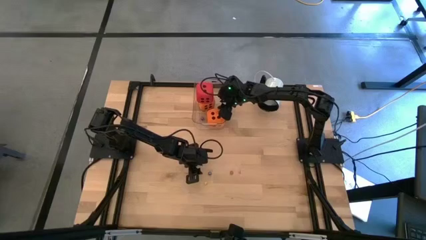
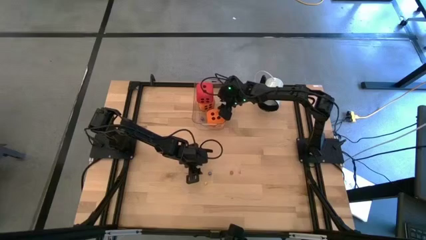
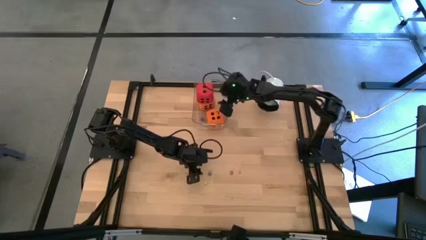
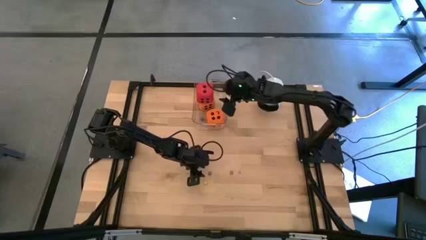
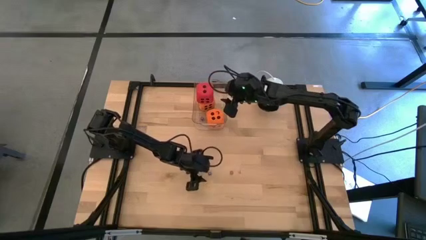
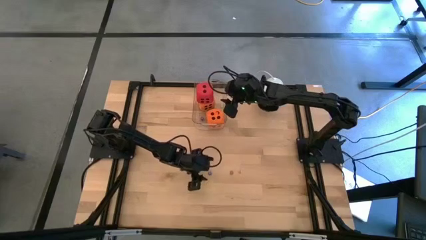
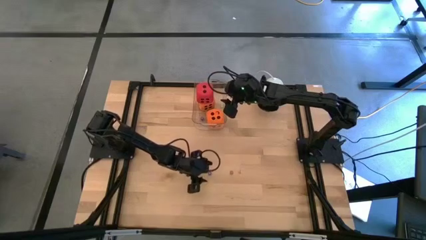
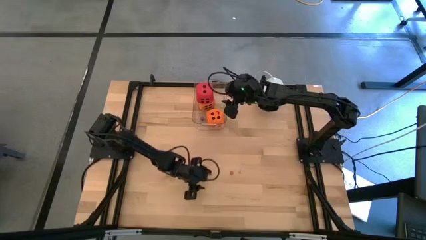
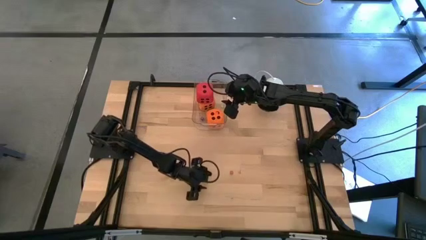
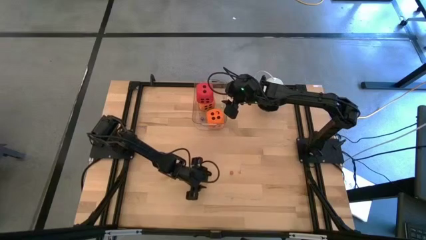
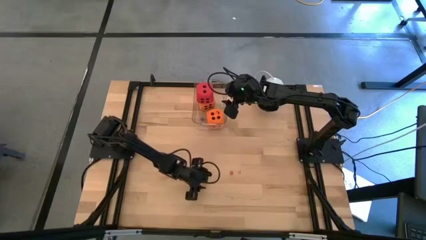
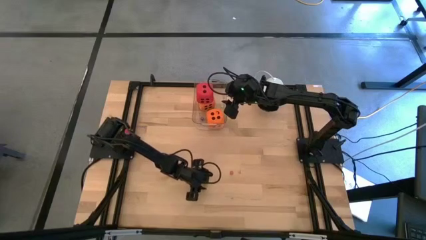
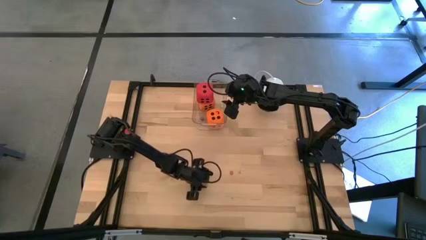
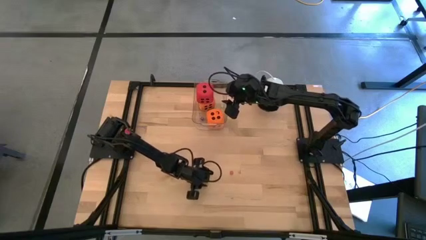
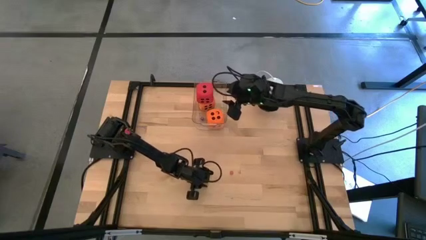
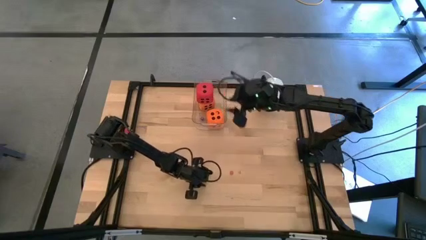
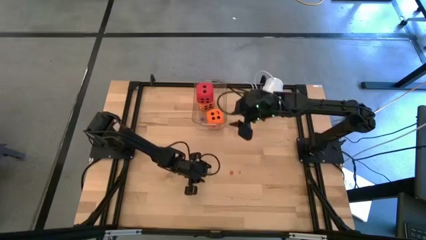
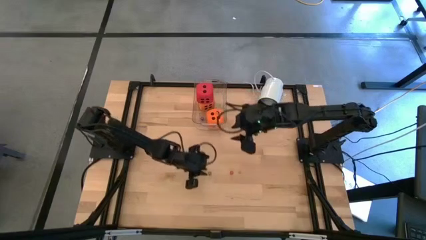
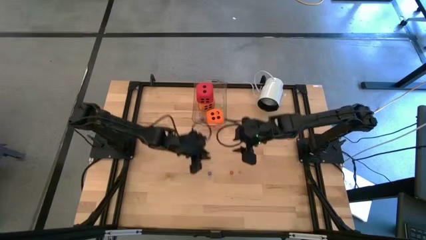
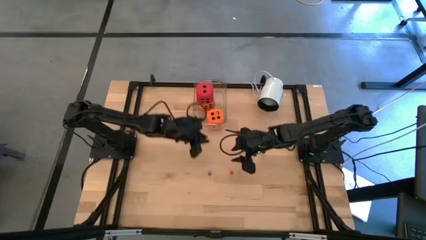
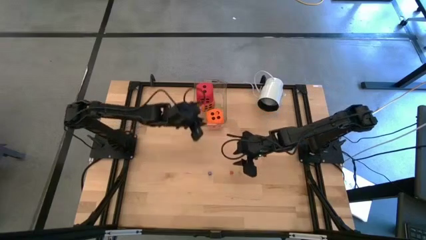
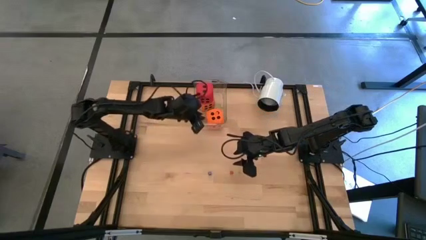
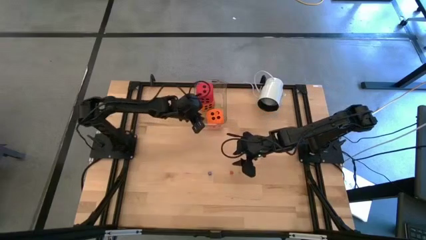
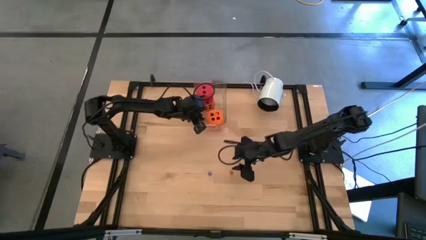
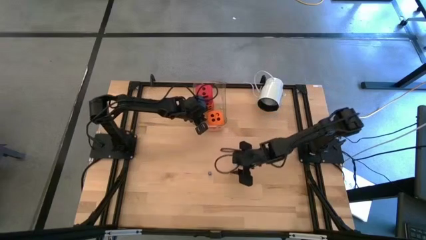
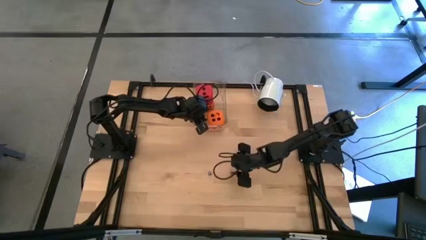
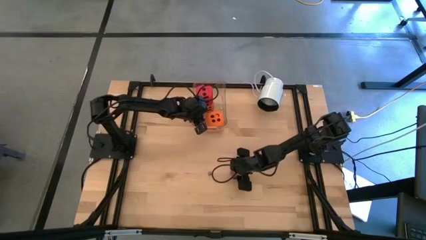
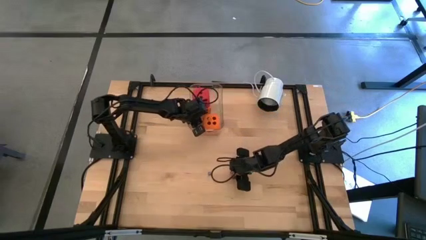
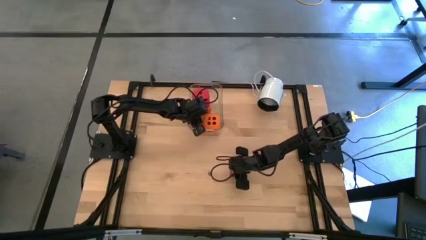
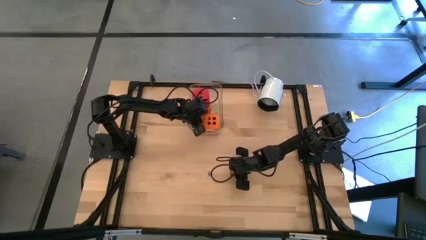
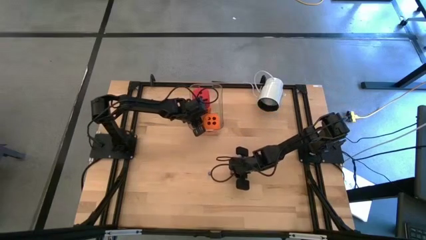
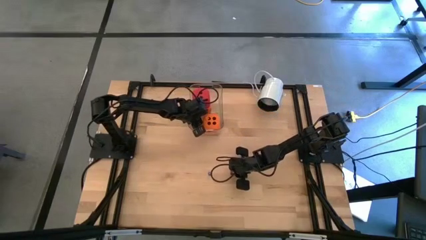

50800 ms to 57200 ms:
Task: Pick & Place Dice
Put the small yellow die into the bin

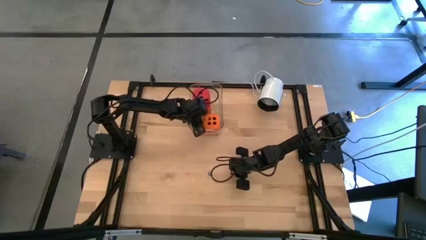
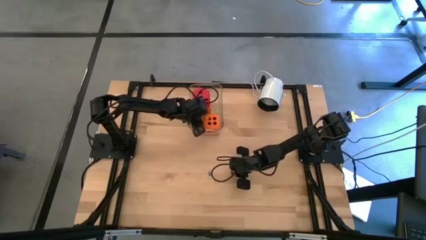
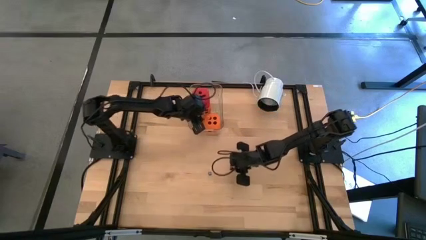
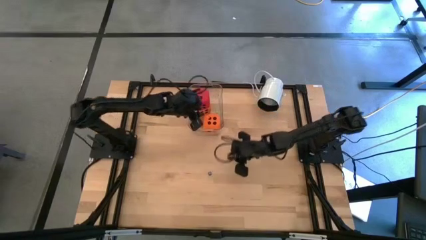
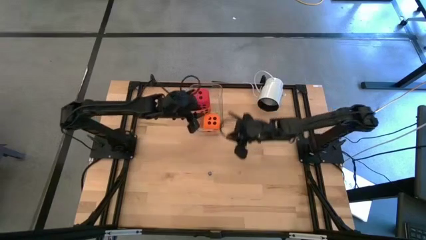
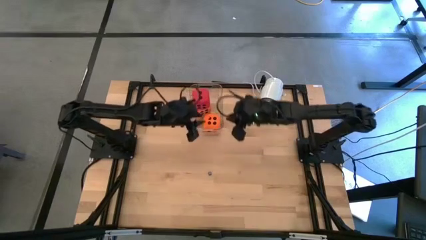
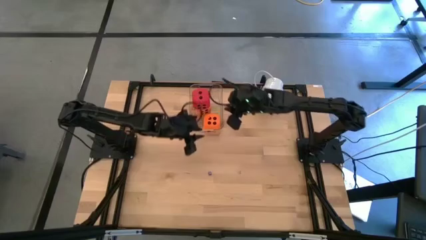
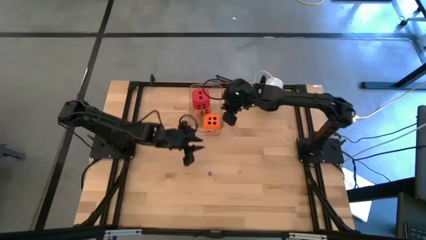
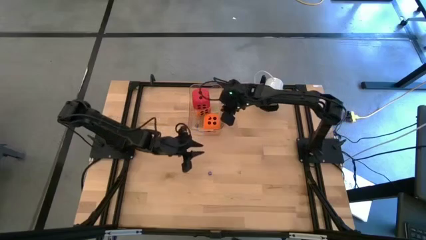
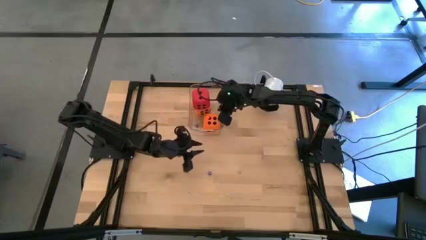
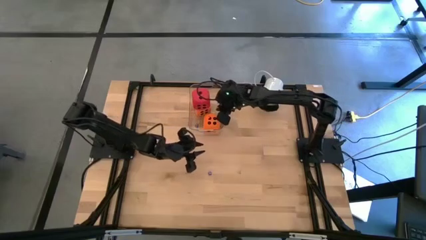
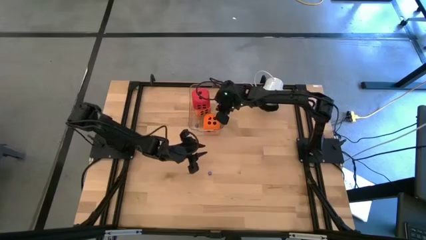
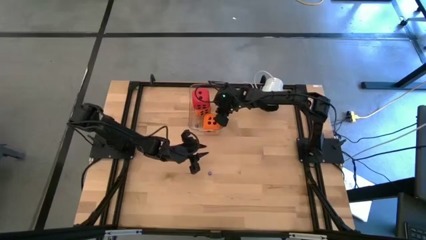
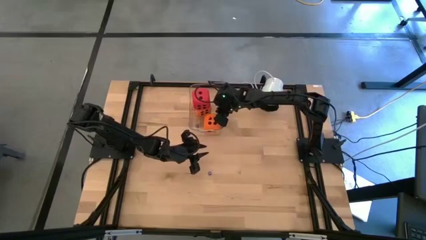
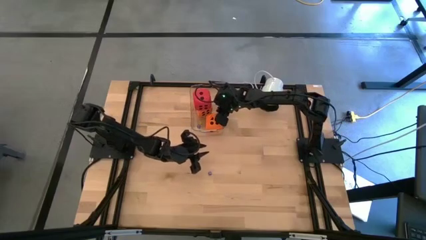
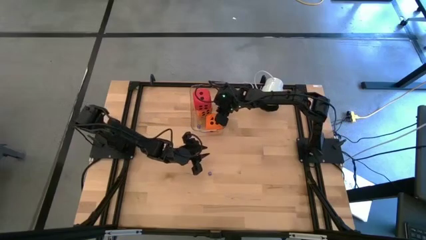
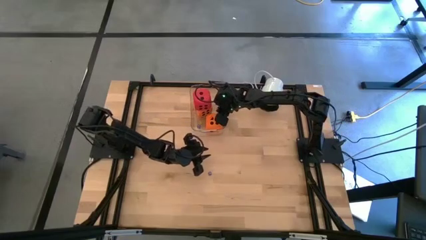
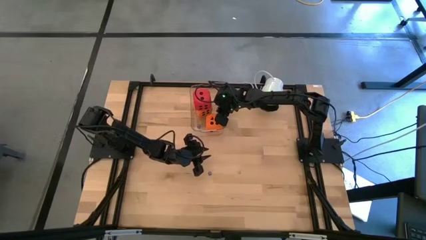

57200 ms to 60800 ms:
Put the small red die into the bin

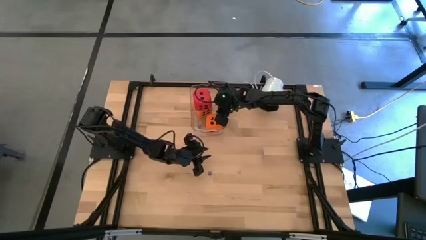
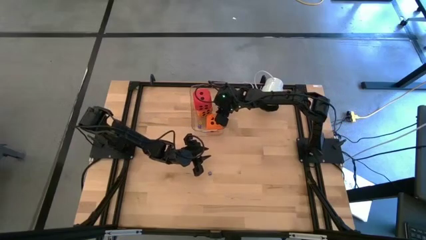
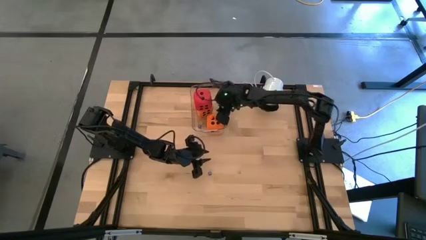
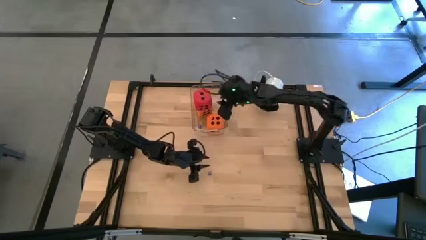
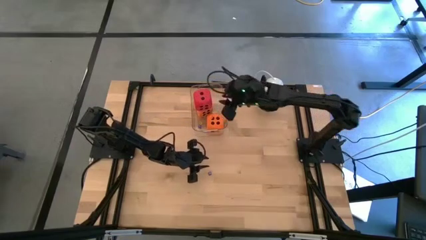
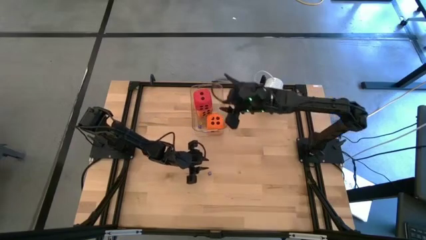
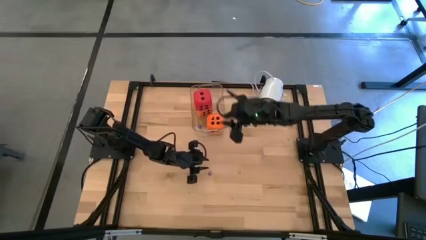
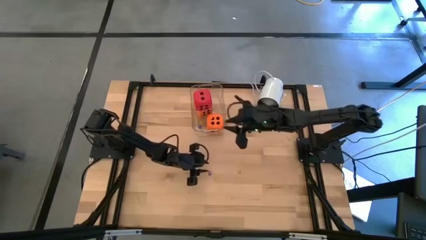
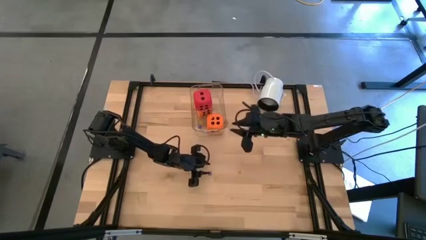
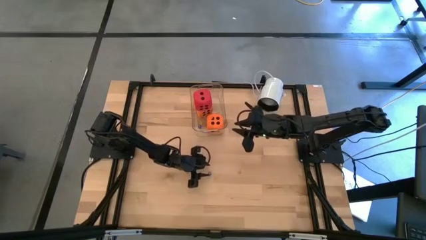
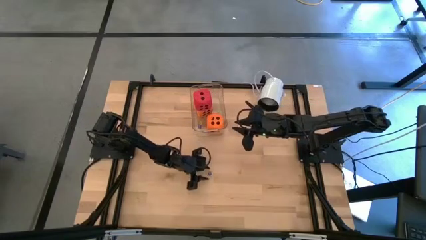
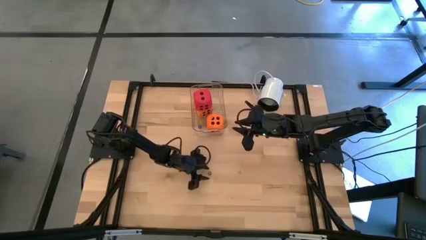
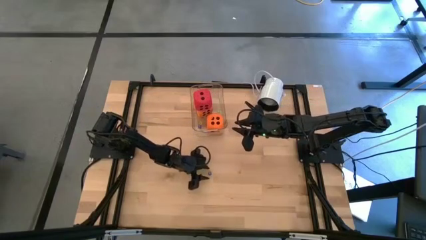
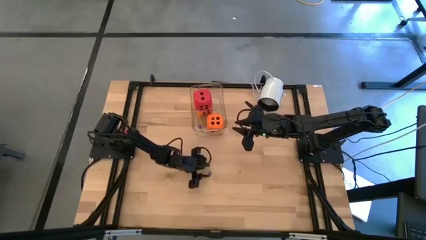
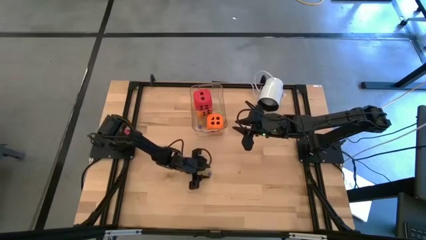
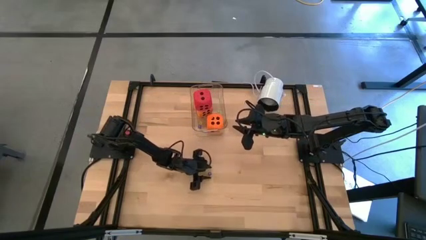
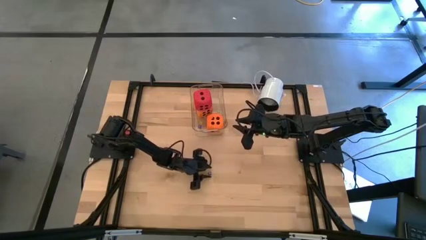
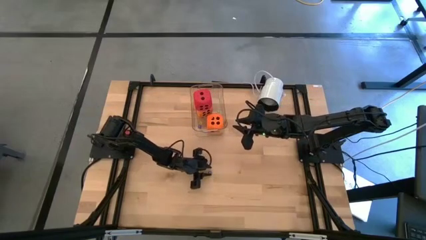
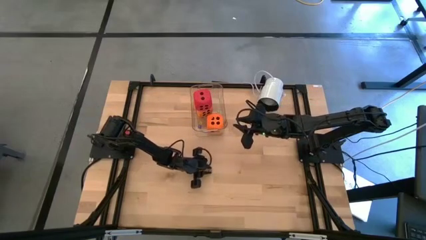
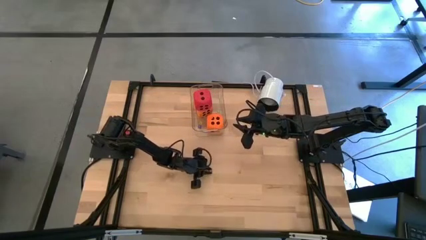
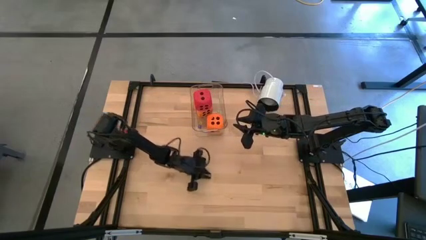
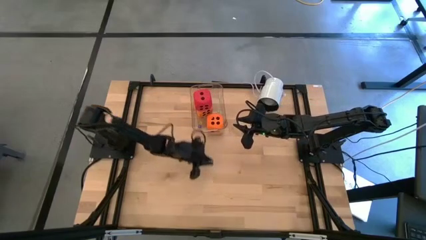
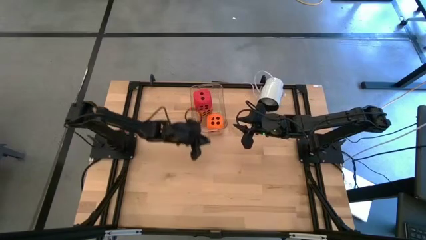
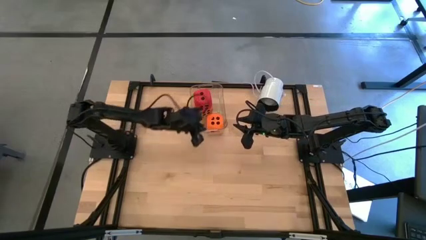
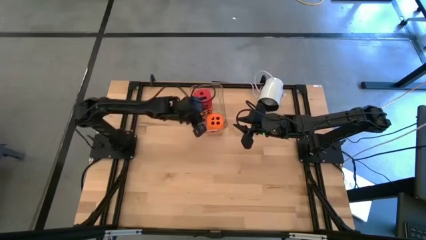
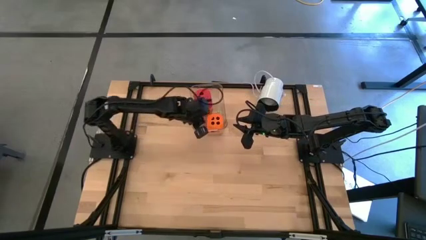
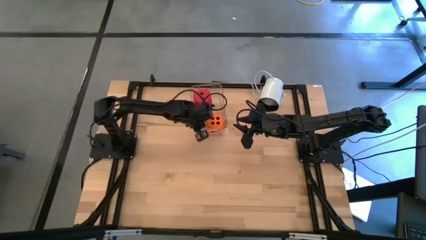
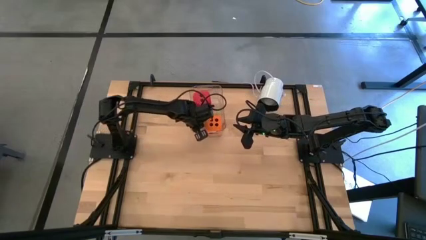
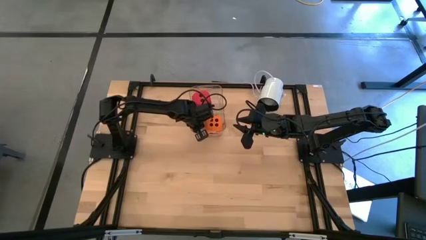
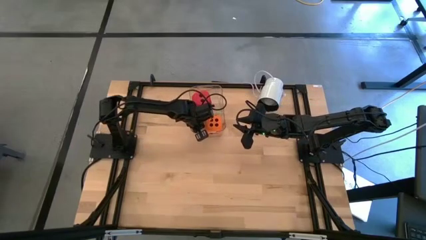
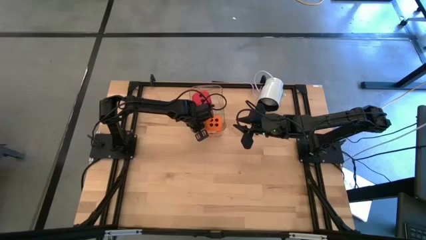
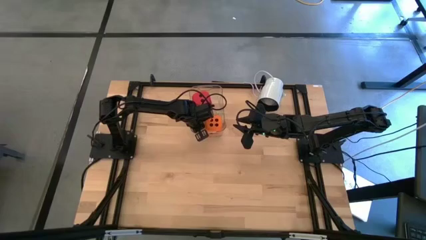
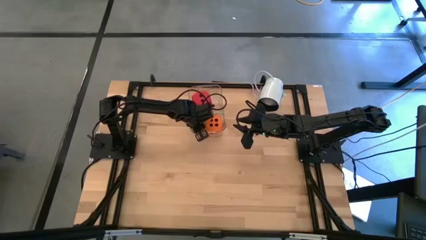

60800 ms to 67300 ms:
Put the small blue die into the bin

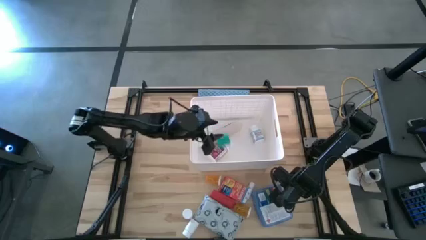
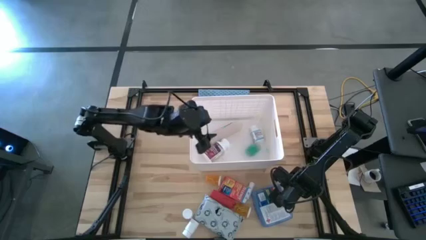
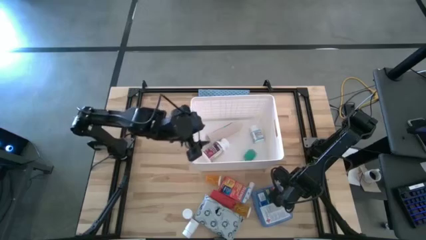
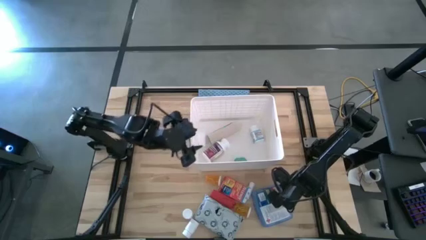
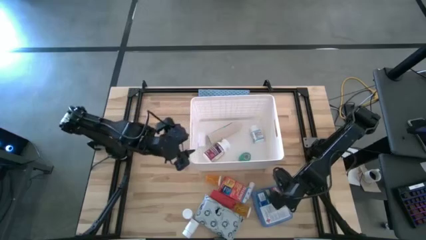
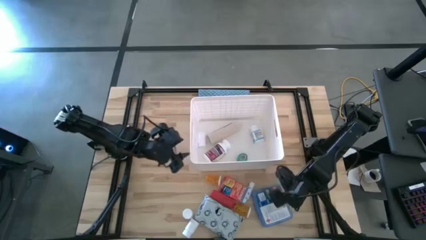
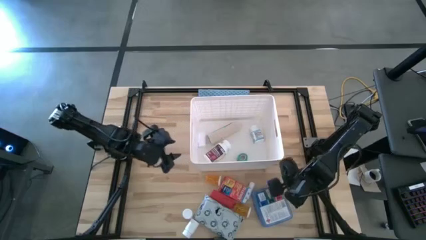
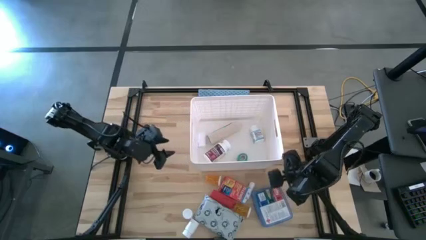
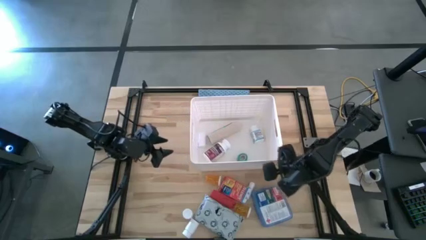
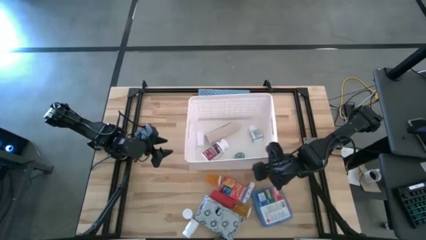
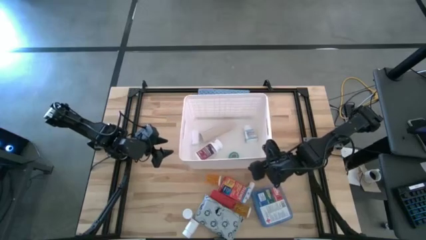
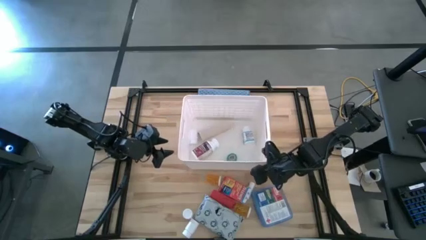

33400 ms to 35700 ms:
Task: Pick & place medical supplies in basket/bin
Adjust the white bin on the table
